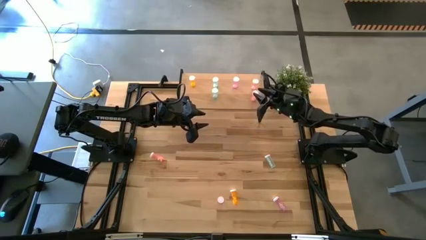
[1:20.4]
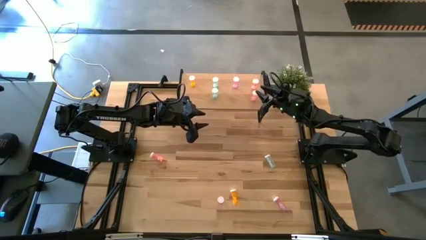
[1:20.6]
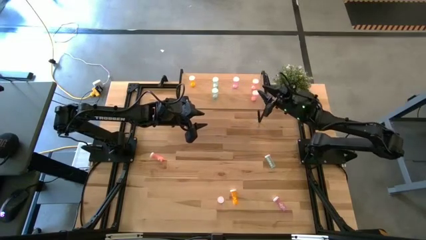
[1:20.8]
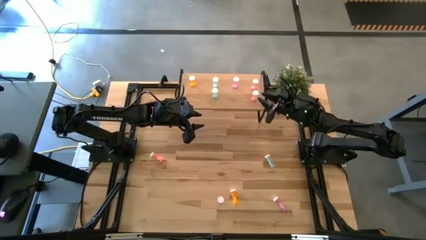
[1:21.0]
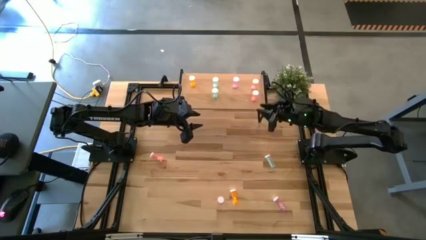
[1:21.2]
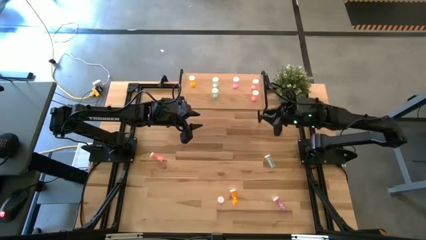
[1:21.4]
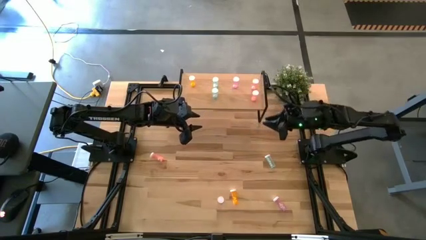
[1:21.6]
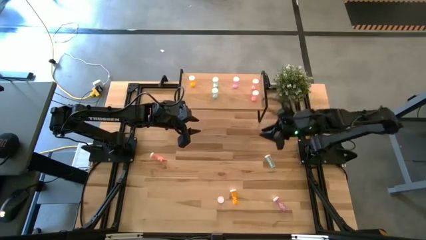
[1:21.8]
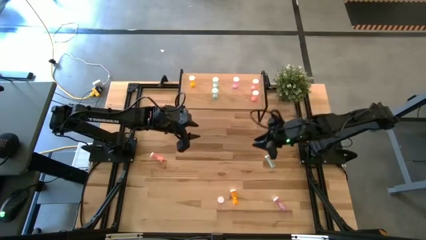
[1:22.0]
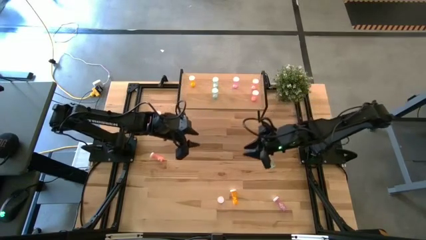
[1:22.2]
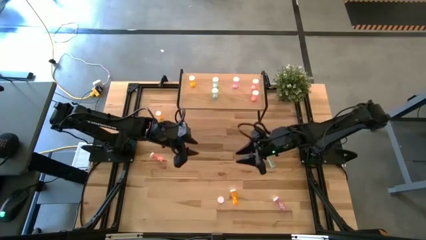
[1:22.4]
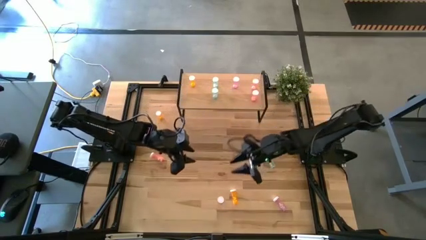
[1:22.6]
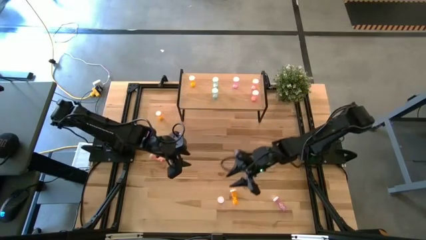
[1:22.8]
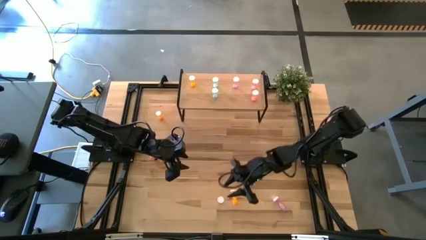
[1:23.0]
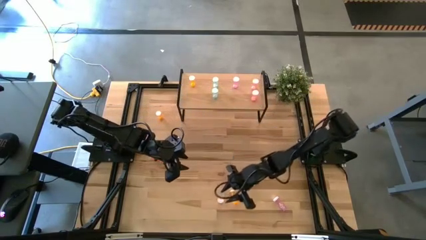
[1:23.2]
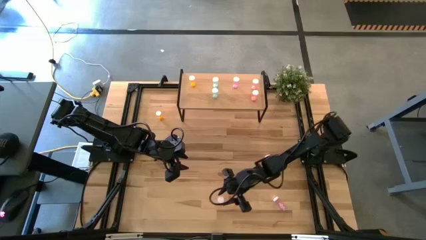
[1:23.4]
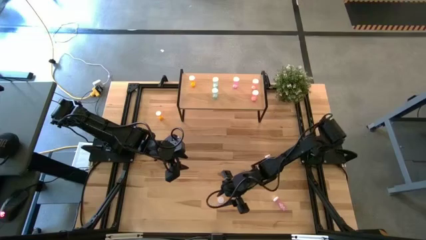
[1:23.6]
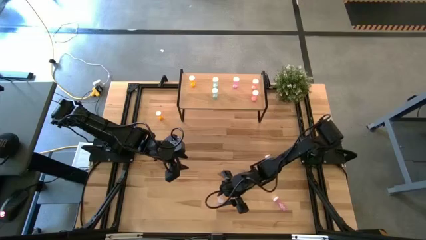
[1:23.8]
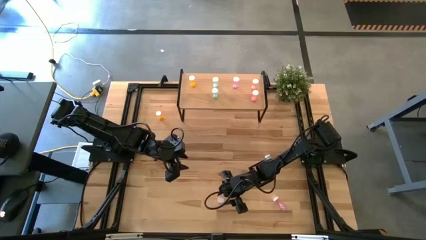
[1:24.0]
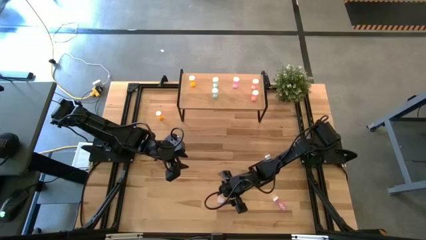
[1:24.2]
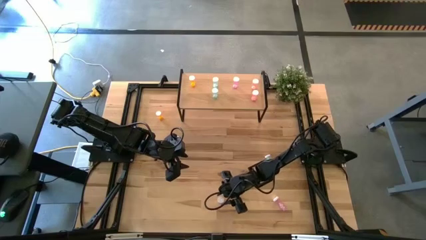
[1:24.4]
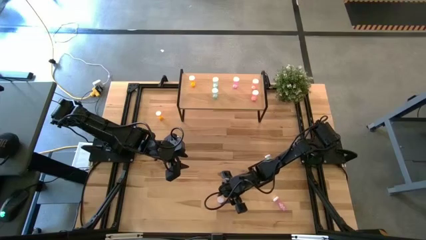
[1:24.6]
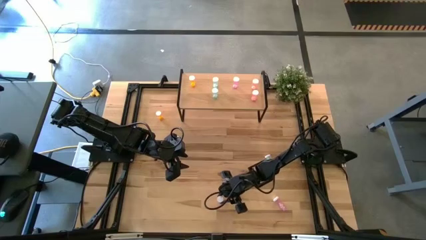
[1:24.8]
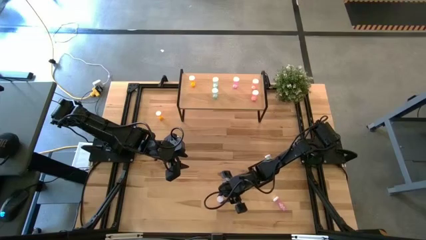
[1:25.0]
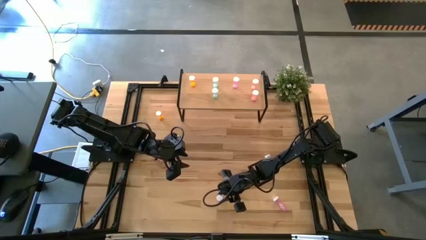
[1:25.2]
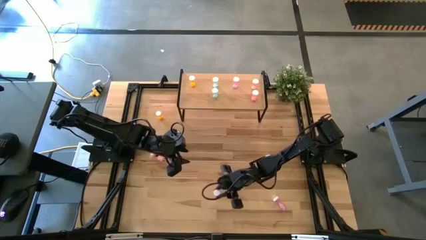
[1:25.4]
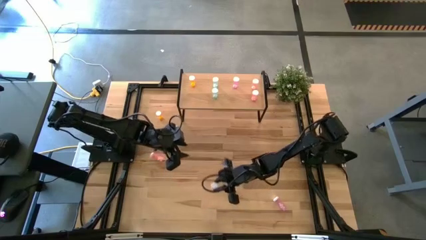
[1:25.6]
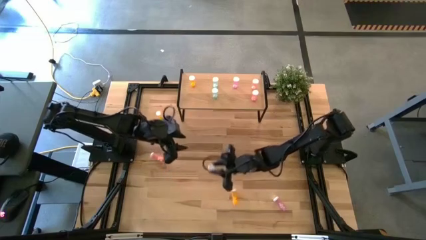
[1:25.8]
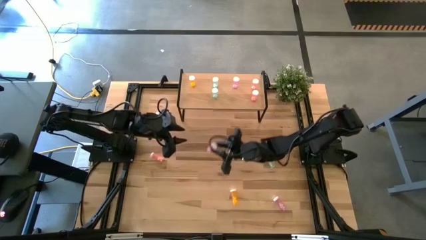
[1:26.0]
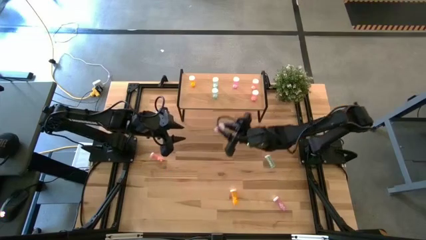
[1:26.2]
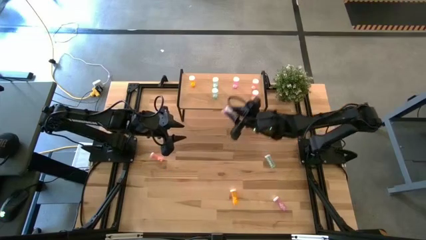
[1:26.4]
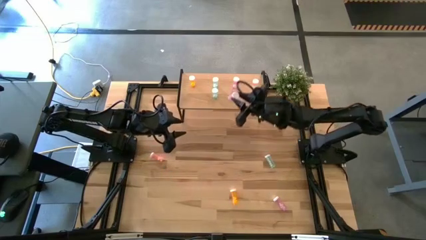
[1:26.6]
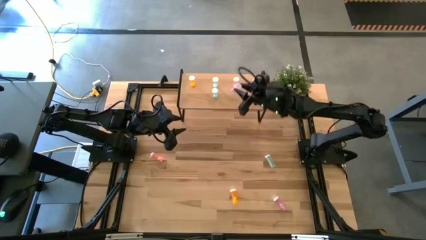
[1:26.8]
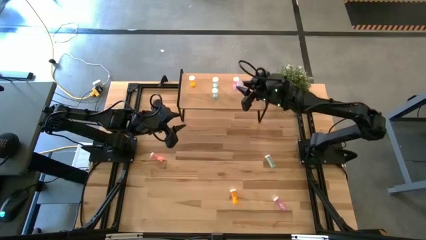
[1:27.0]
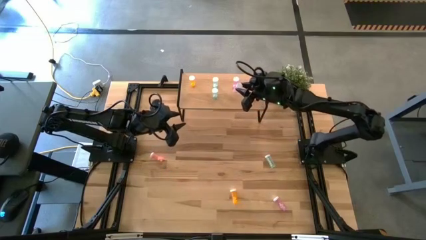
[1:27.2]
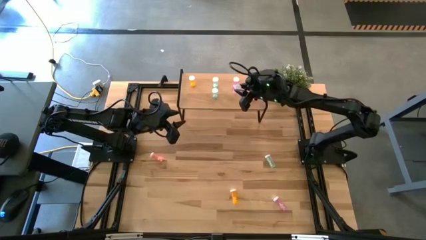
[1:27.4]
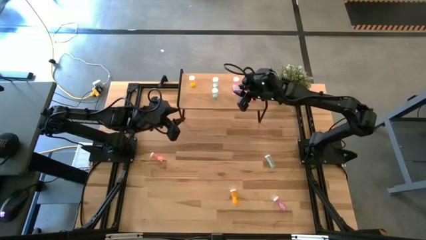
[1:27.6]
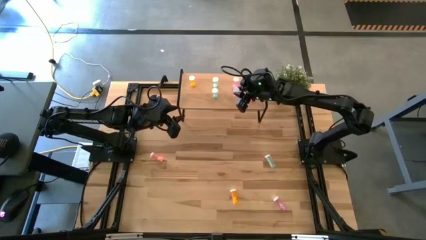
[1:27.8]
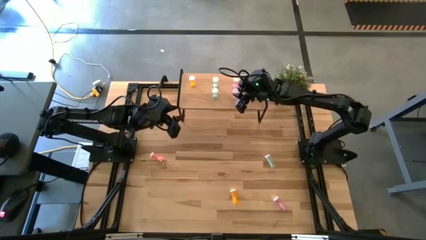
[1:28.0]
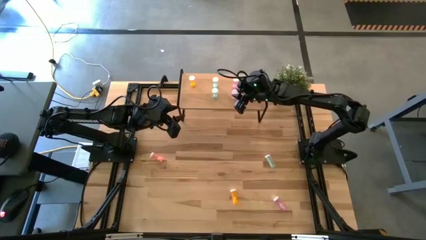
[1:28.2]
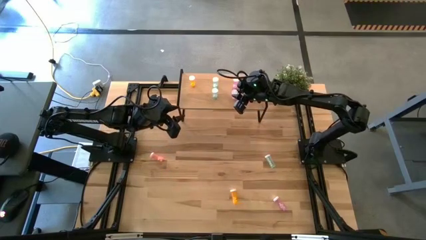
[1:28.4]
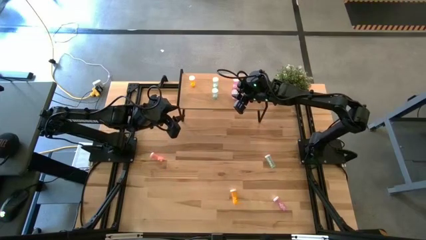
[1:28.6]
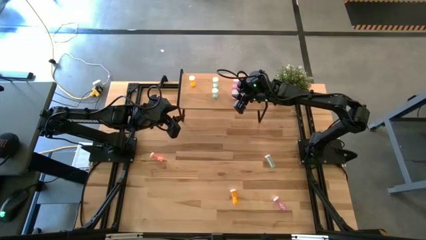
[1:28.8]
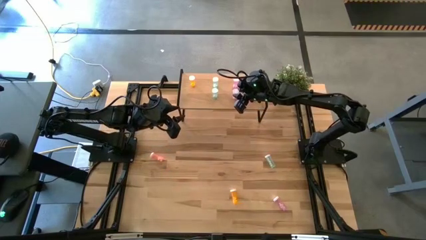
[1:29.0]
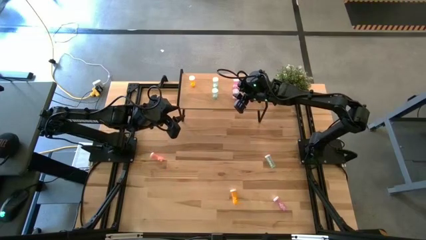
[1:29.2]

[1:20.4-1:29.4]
Task: Pick and place medicine bottles onto shelf by color
Put the left purple pill bottle aligned with the other purple pill bottle

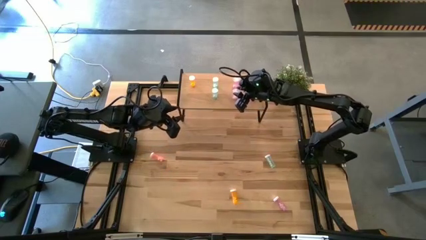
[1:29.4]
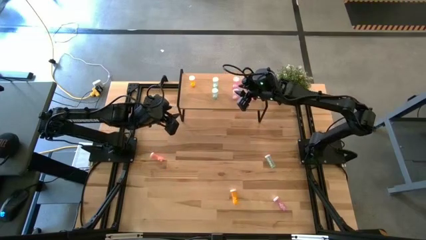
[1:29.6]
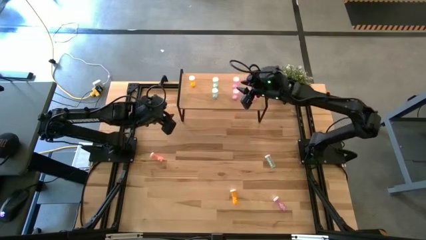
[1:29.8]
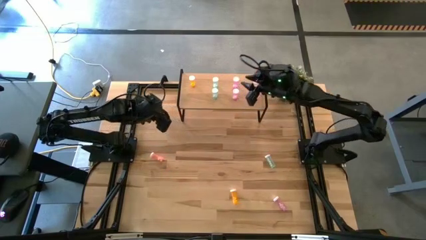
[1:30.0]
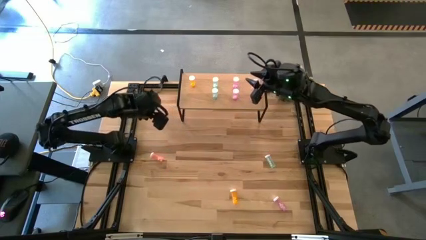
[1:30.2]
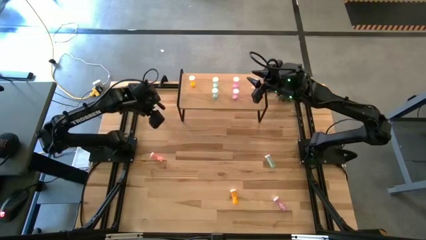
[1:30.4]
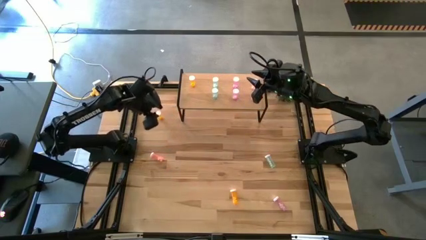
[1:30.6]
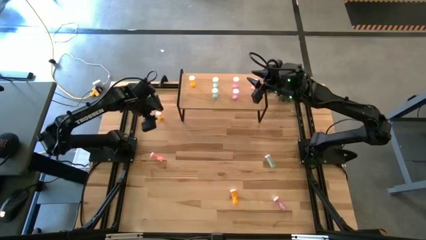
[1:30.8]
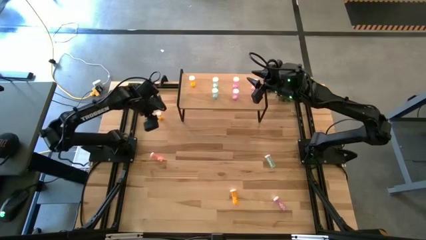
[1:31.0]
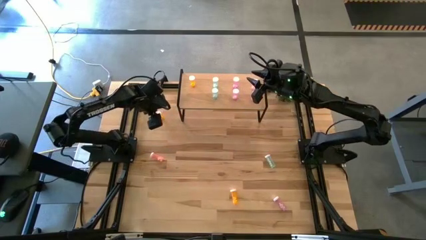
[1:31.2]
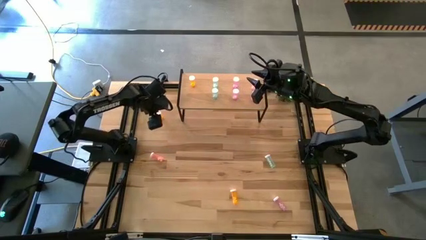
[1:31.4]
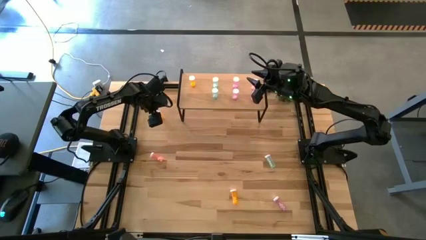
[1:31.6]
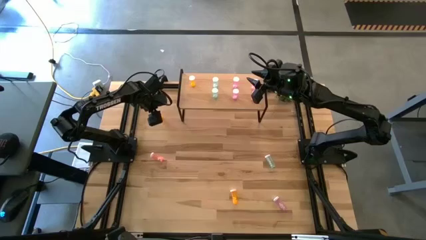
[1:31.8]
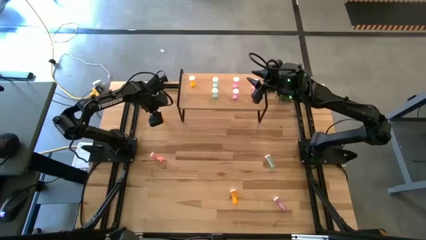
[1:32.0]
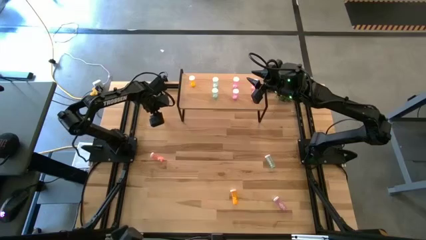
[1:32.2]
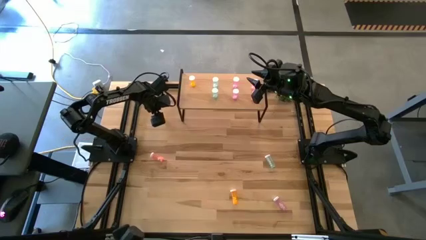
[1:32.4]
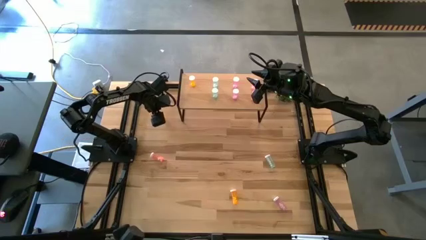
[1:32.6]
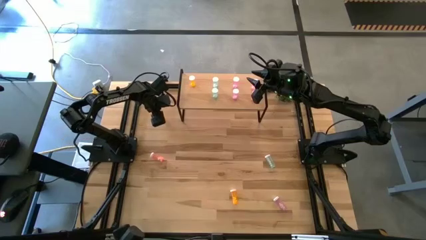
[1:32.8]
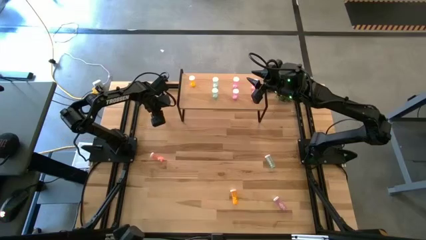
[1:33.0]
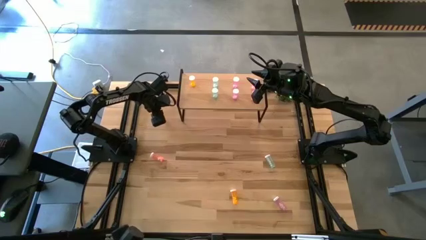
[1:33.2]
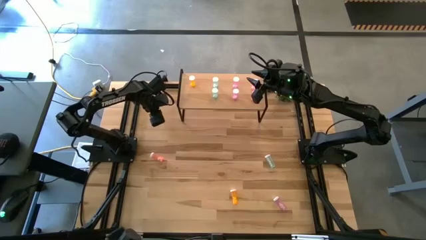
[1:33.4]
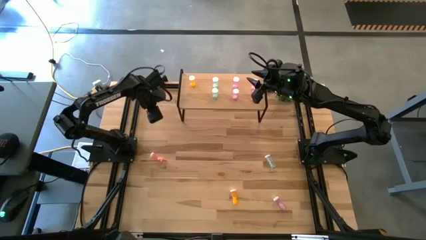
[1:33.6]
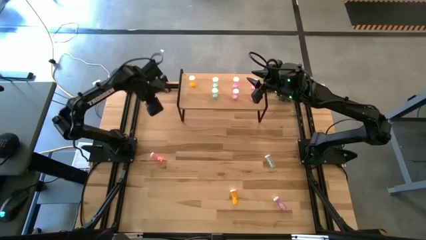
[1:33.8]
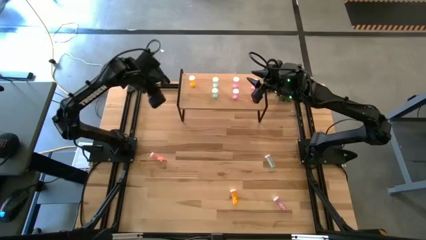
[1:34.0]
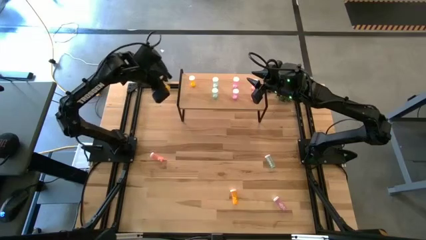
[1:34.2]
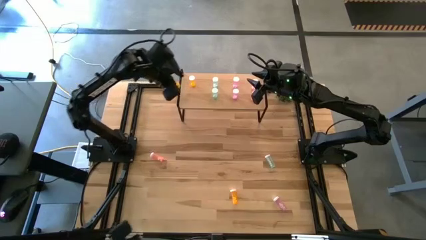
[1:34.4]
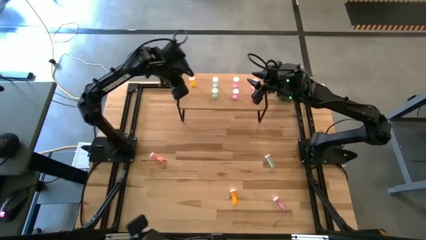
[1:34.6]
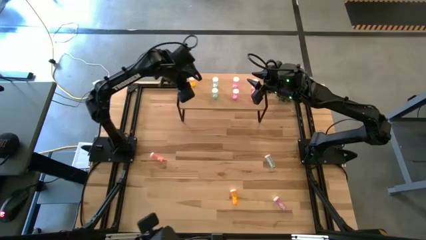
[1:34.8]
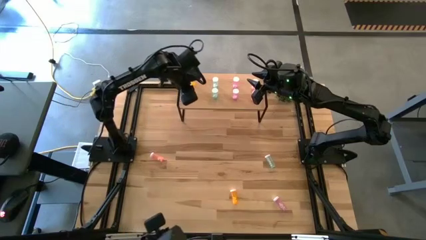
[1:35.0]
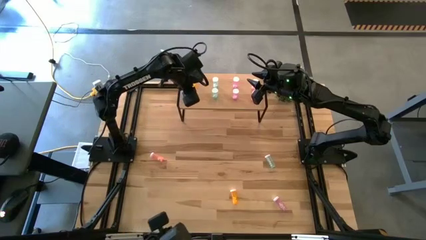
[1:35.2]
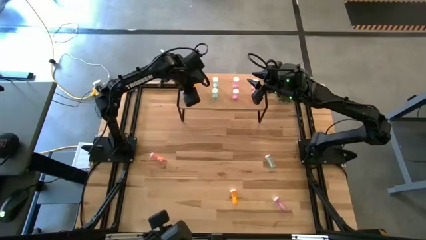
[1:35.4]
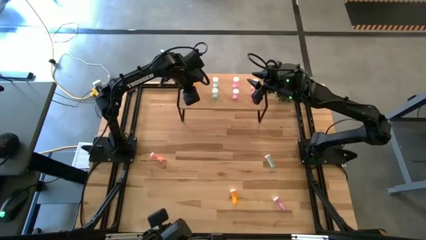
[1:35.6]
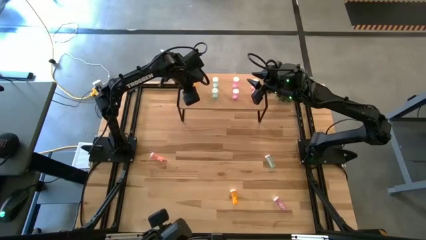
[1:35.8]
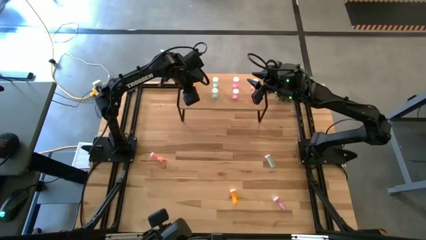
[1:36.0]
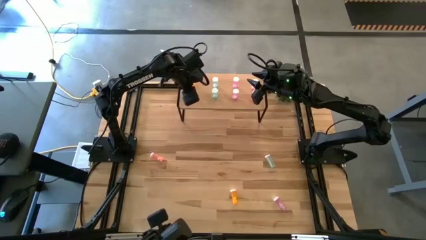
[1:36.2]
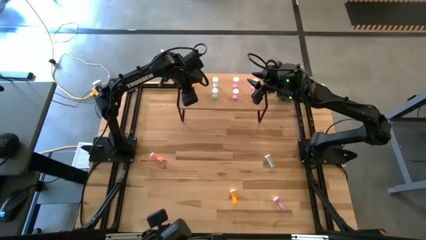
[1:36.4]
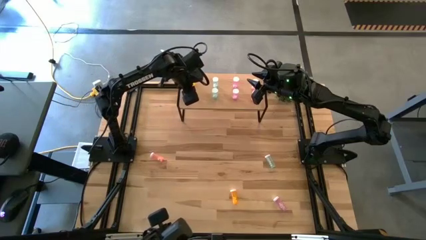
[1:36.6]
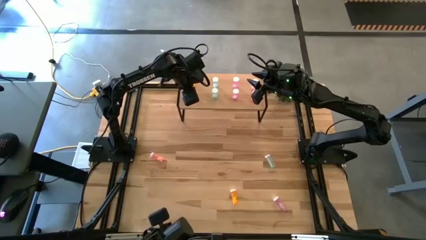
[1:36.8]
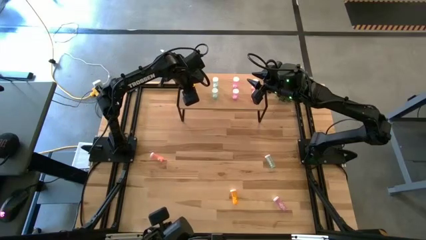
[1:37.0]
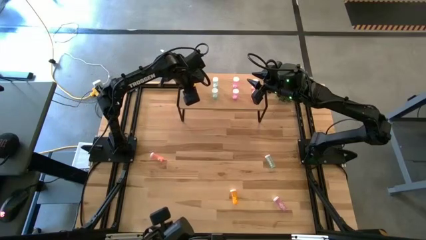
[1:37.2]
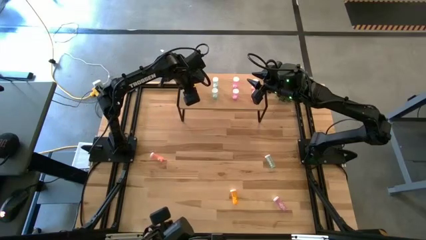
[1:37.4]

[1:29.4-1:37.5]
Put the top orange pill bottle aligned with the other orange pill bottle
